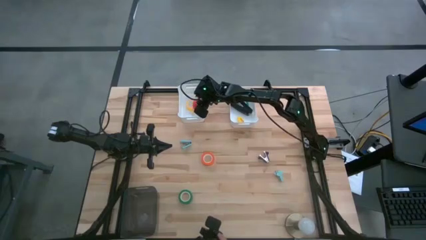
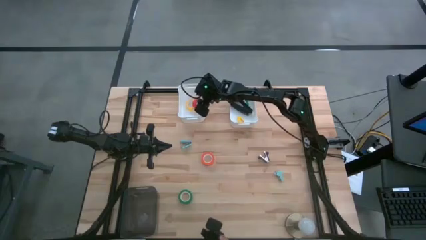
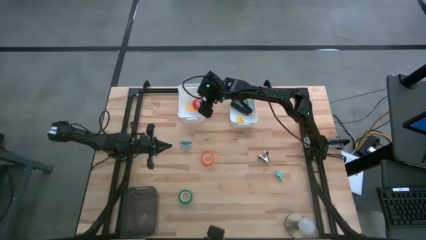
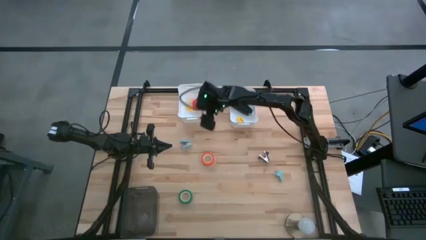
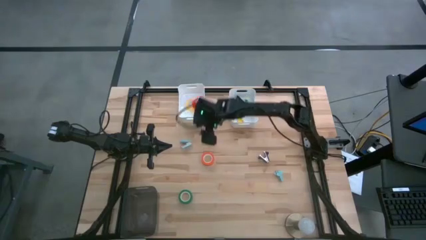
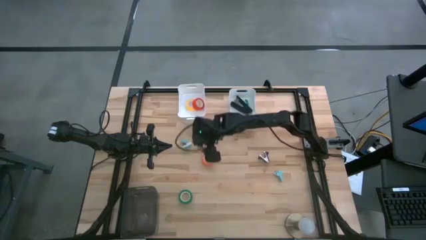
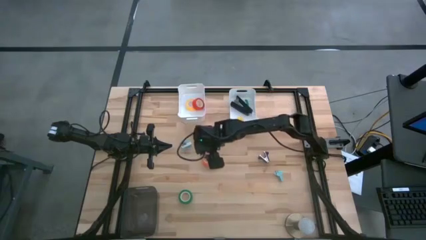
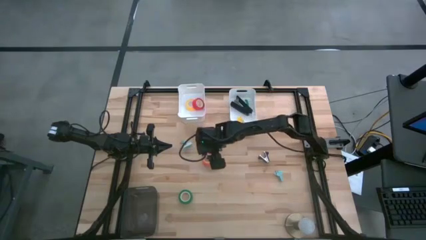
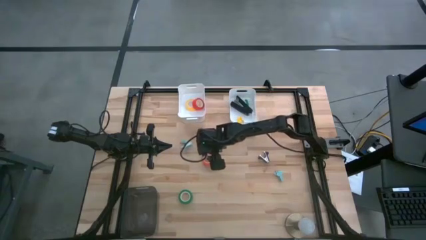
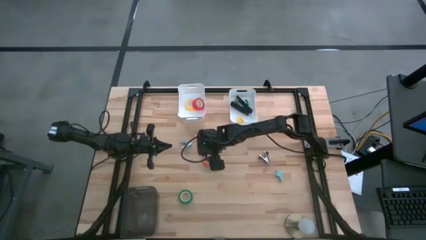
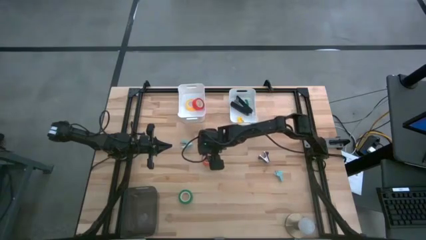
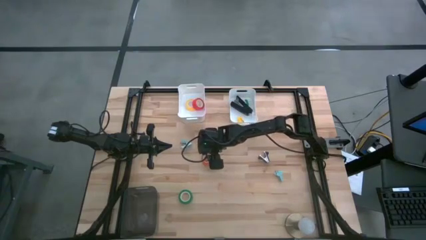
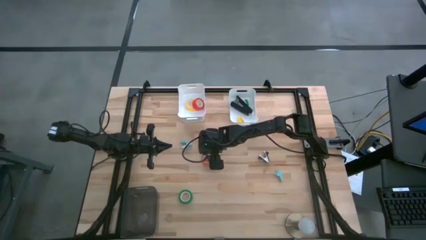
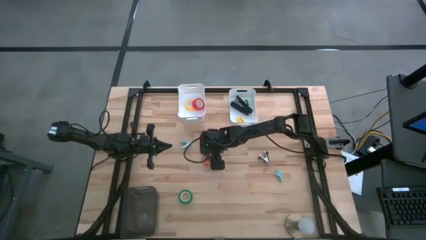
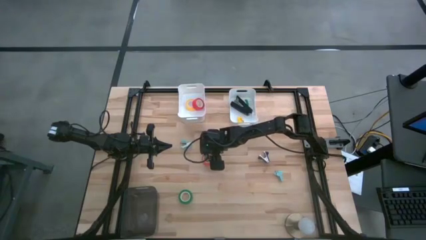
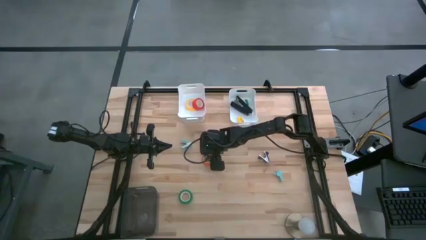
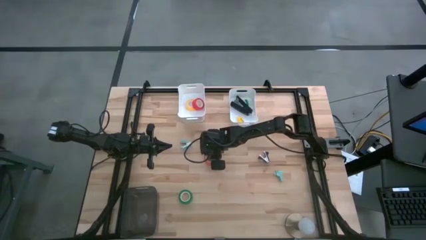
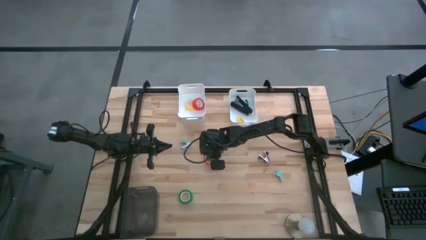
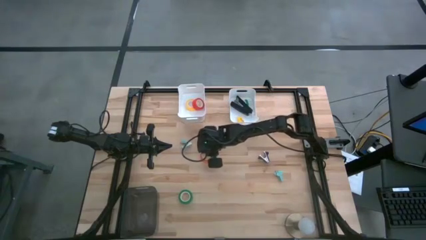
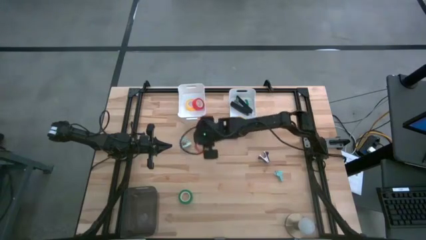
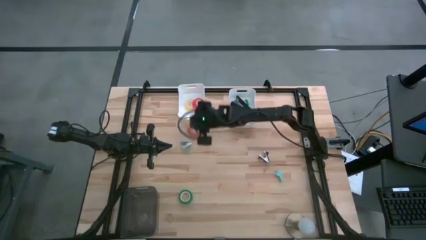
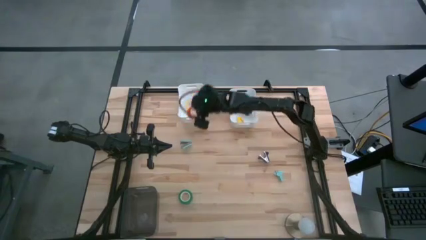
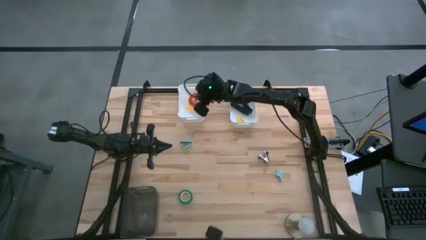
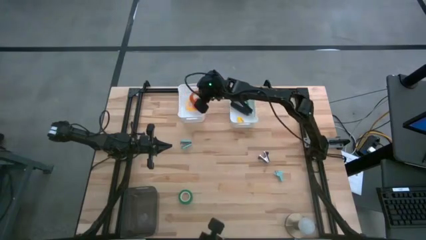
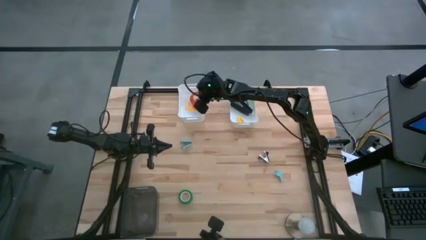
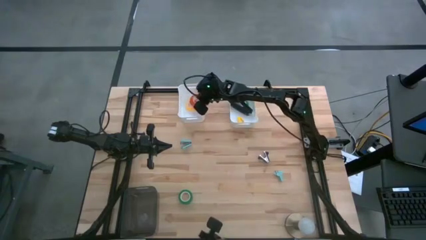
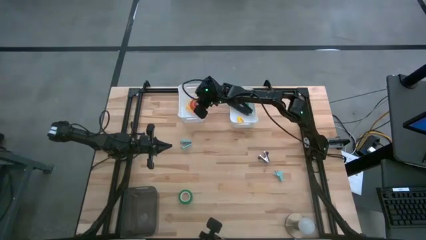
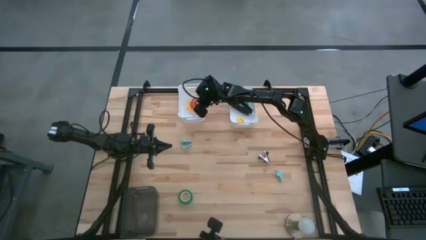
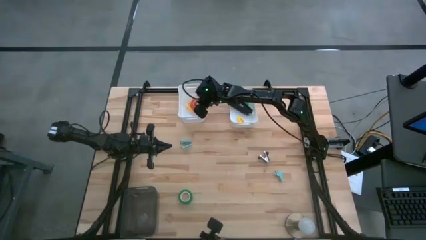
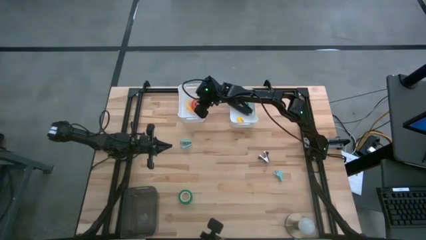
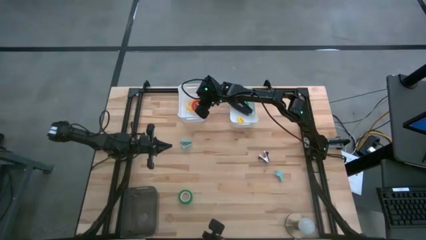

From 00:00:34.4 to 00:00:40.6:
Task: Pick and place Stapler, Stapler remover, tape
Put the orange tape into the left white bin

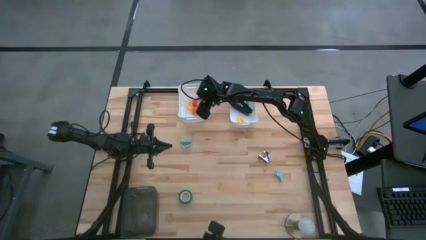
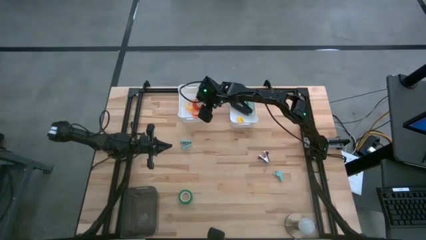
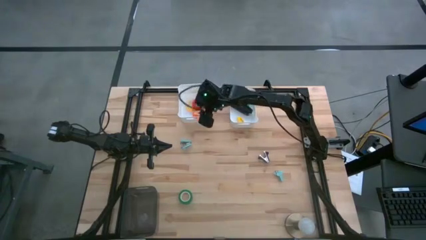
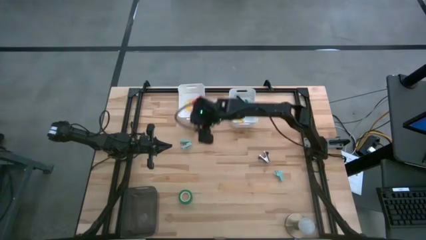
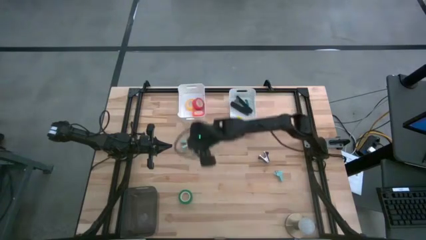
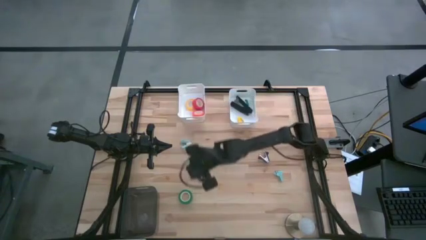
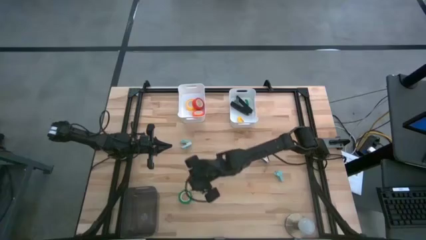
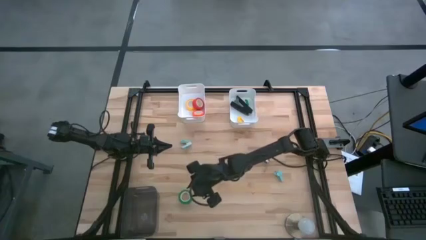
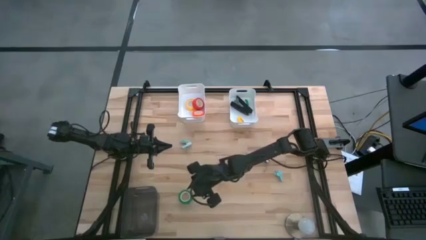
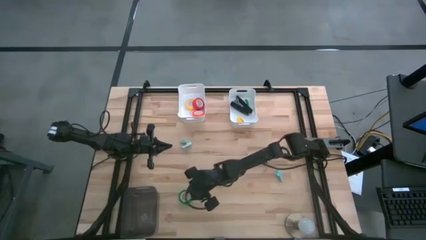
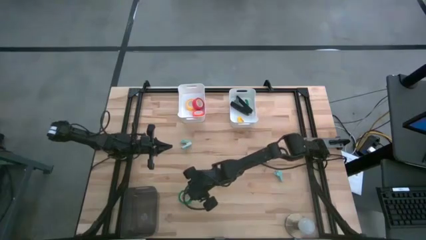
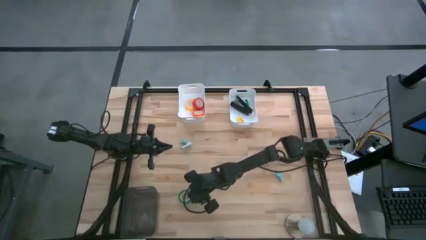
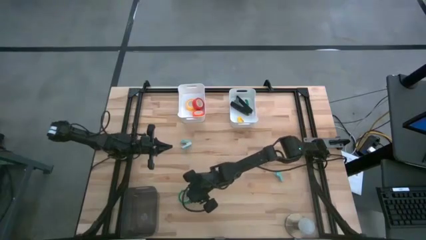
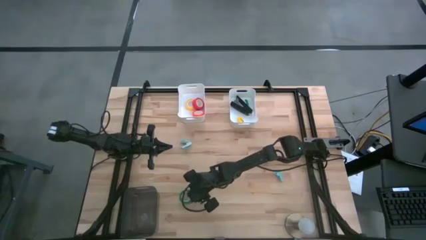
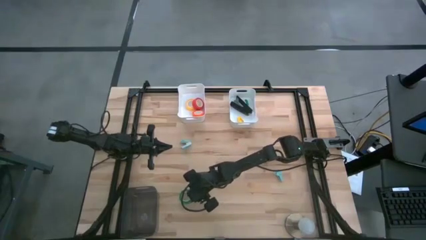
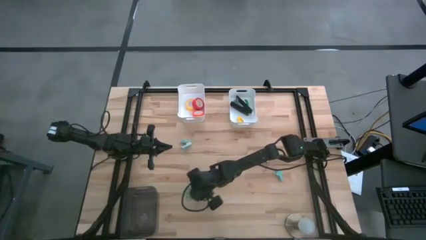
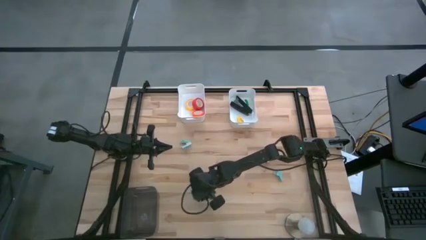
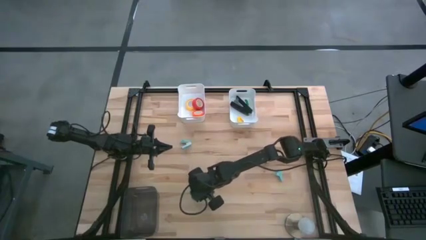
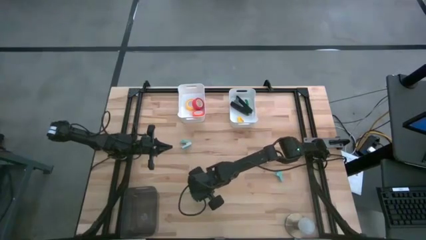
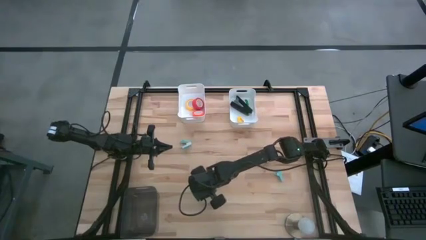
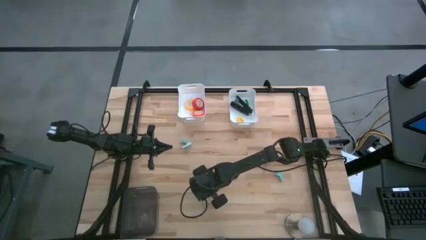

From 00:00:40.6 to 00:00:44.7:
Put the green tape into the left white bin

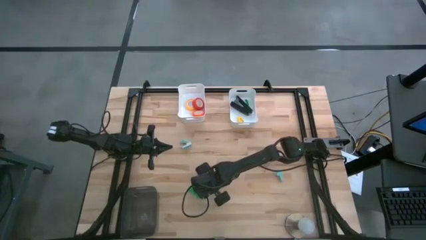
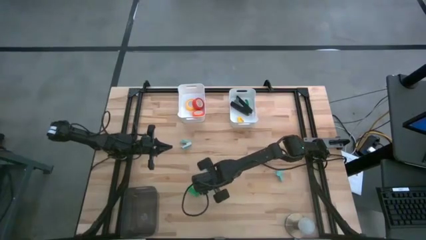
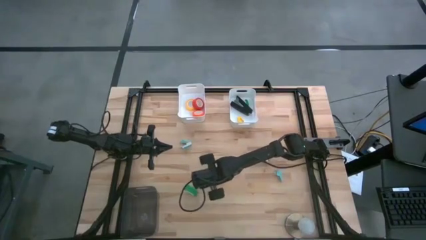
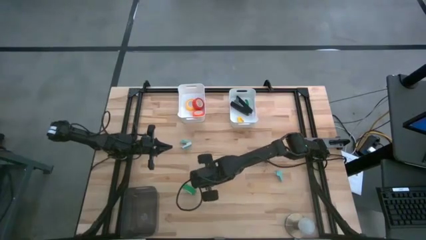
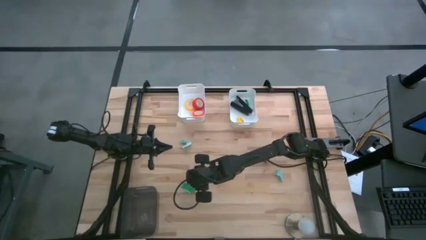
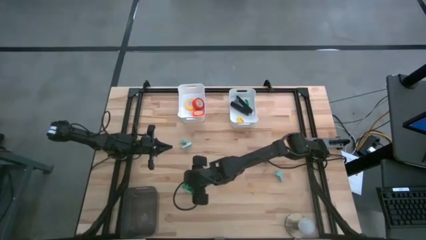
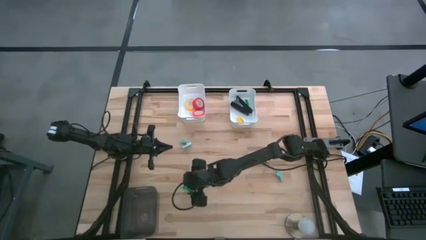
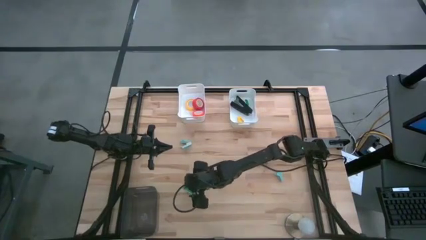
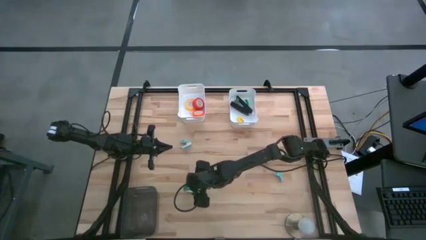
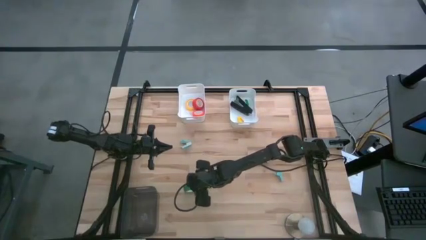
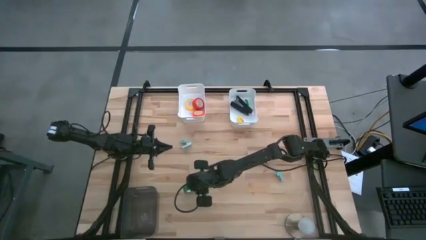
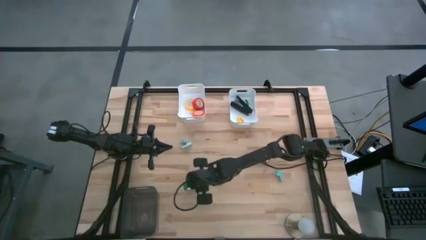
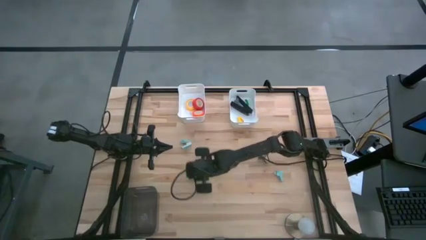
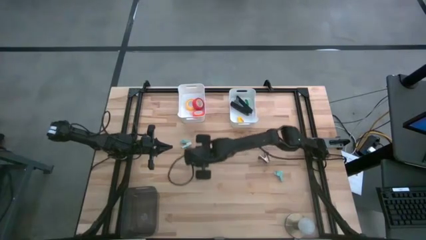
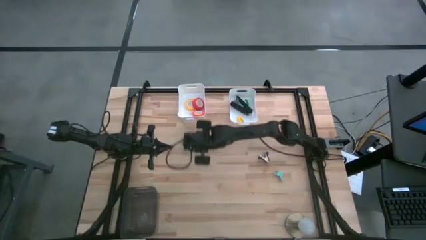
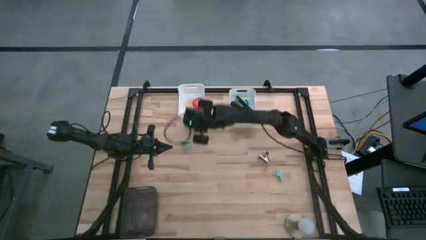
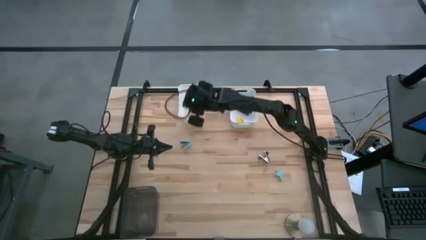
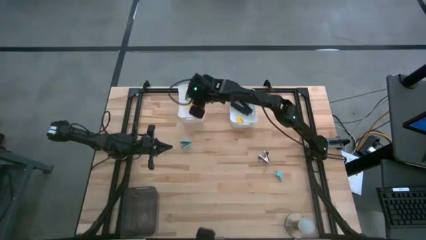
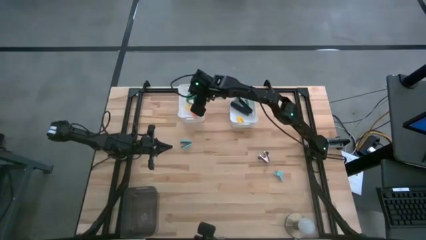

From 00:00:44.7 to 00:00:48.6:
Put the green tape into the left white bin

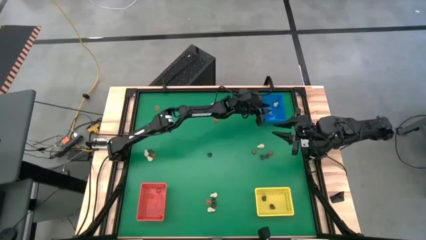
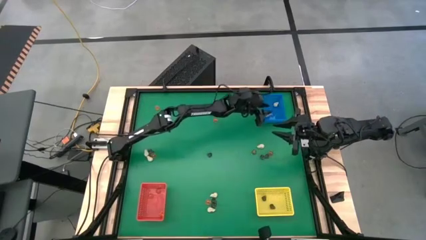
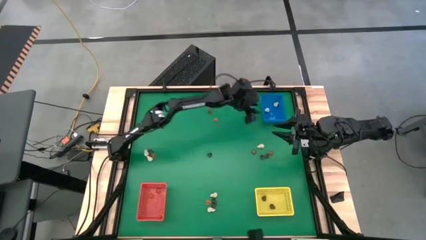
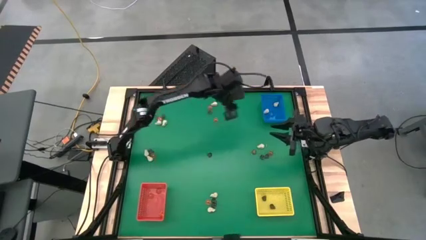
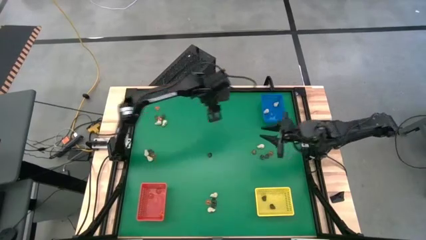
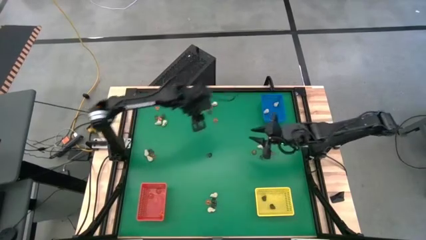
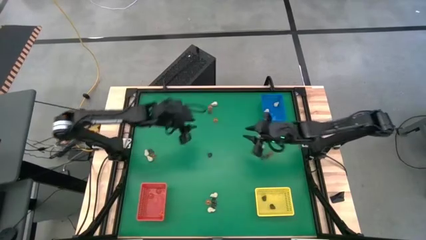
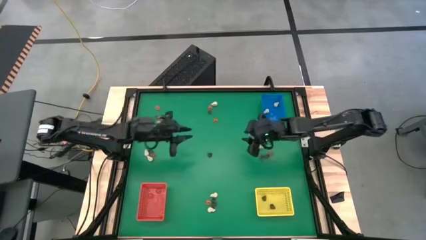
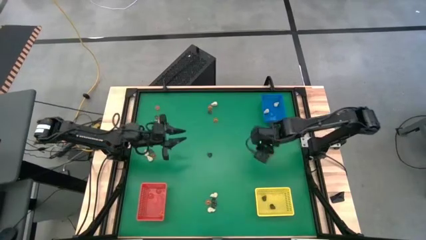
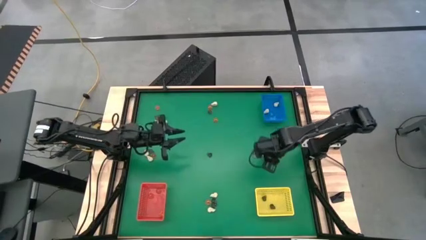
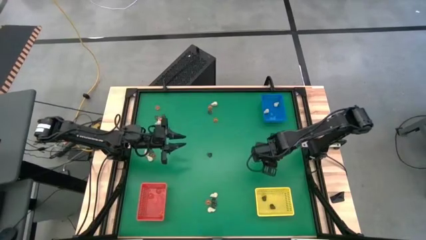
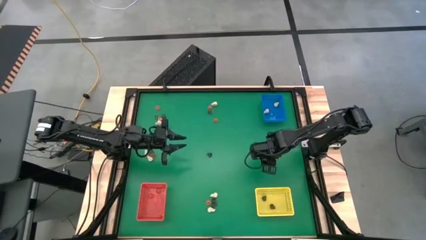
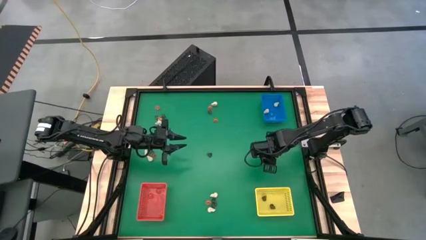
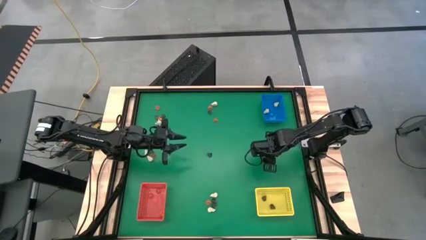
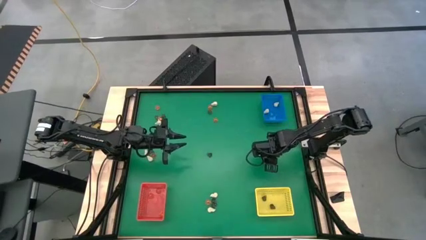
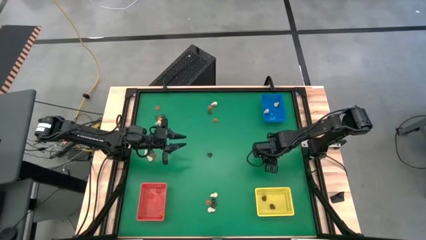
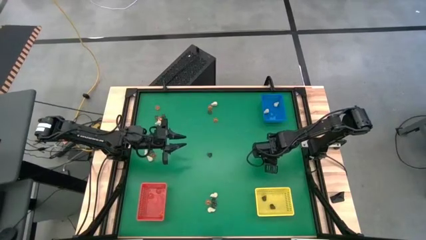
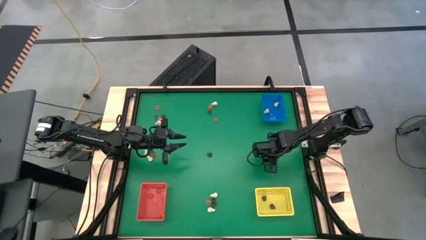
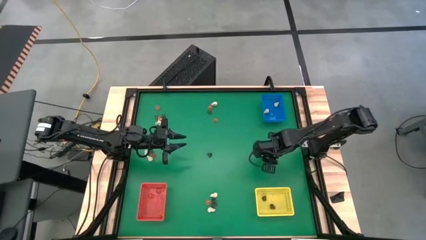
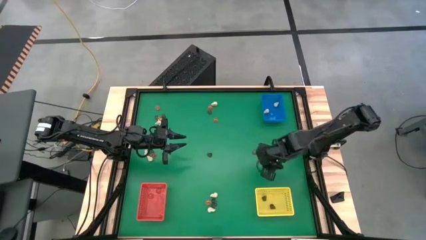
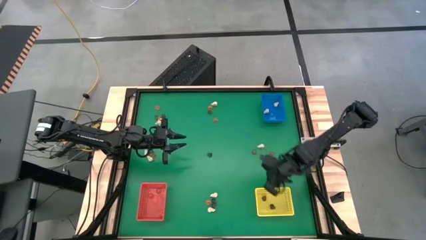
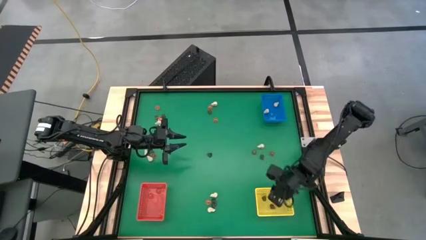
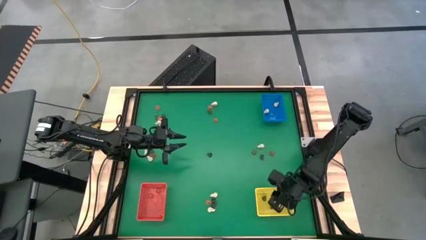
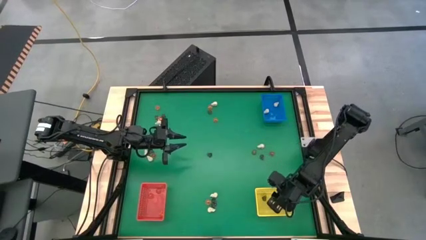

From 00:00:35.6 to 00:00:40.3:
Task: Sort Halloween decoration
Put the black skull toy into the yellow bin
